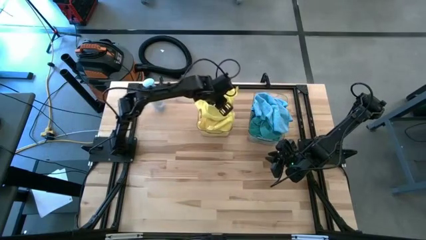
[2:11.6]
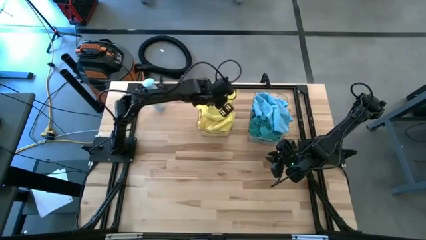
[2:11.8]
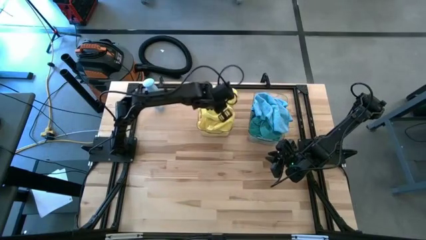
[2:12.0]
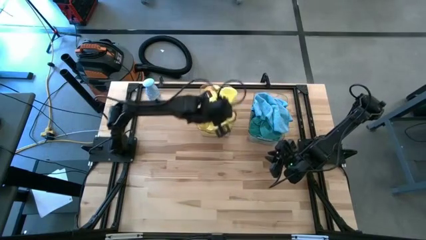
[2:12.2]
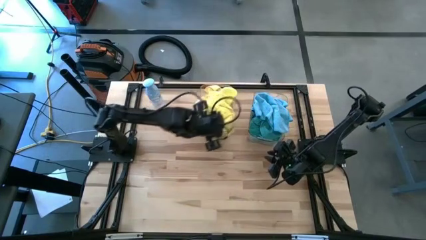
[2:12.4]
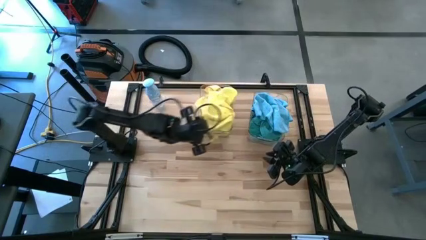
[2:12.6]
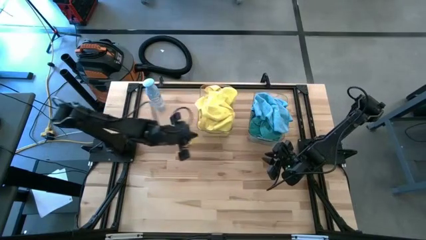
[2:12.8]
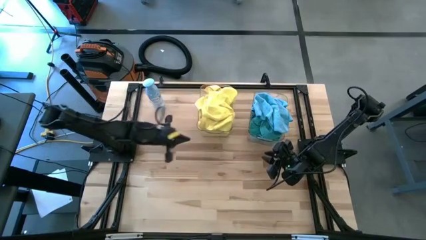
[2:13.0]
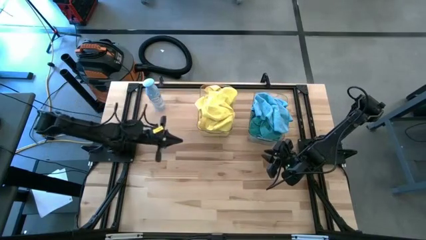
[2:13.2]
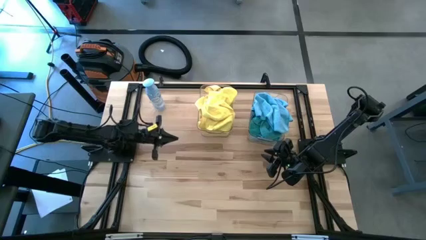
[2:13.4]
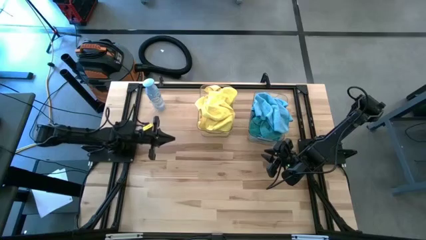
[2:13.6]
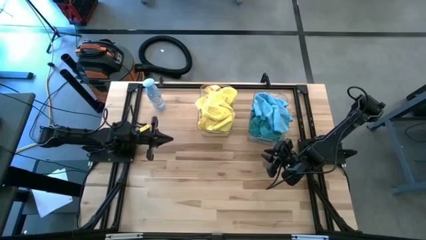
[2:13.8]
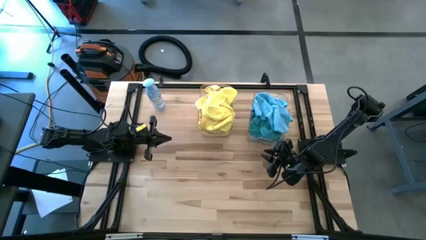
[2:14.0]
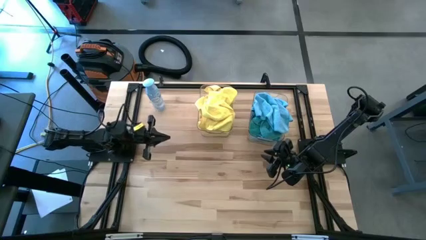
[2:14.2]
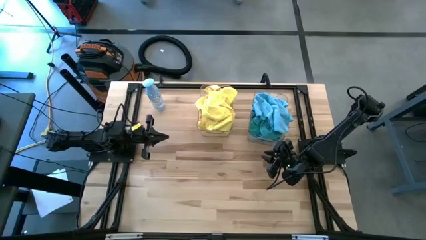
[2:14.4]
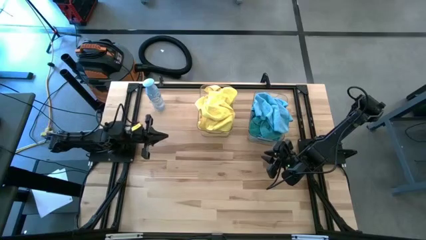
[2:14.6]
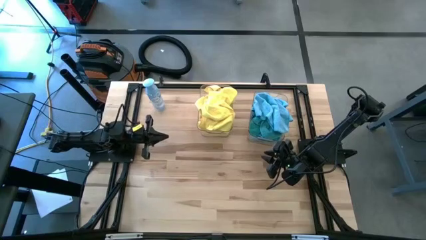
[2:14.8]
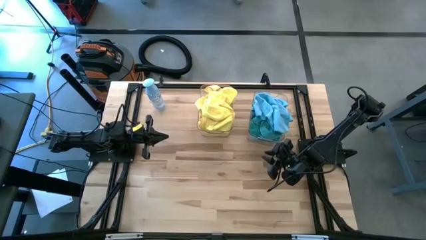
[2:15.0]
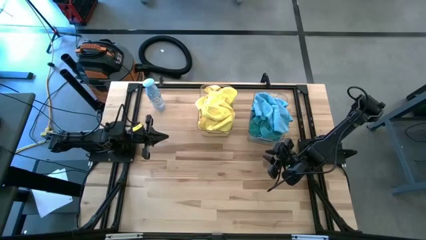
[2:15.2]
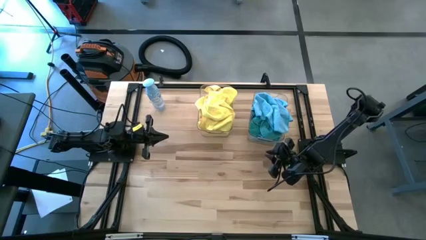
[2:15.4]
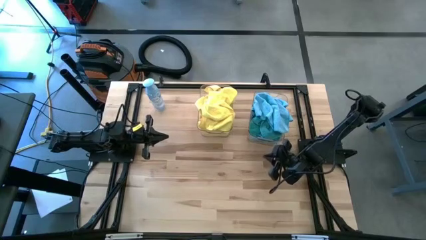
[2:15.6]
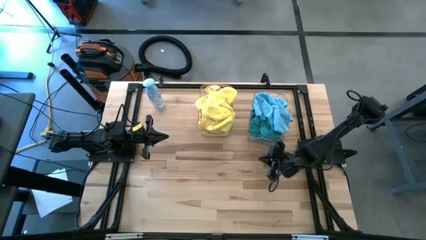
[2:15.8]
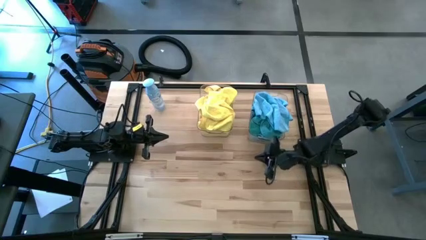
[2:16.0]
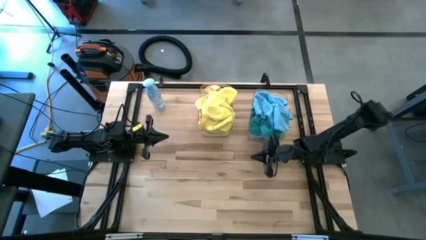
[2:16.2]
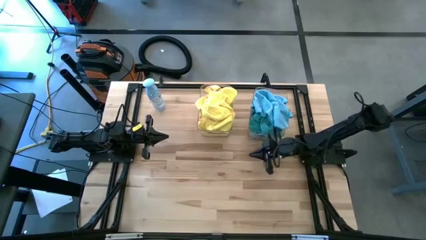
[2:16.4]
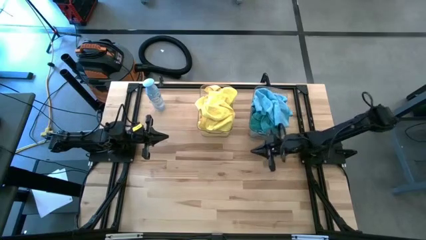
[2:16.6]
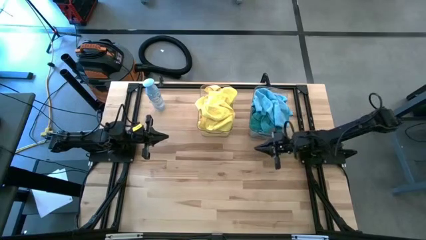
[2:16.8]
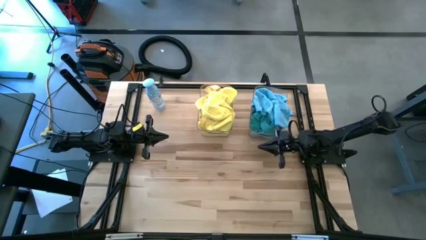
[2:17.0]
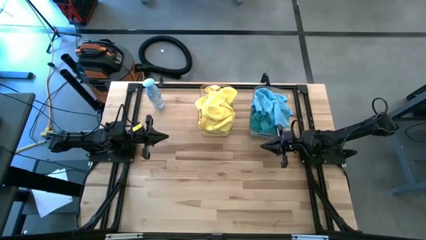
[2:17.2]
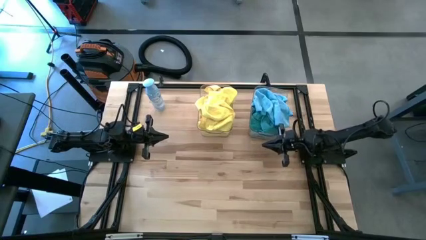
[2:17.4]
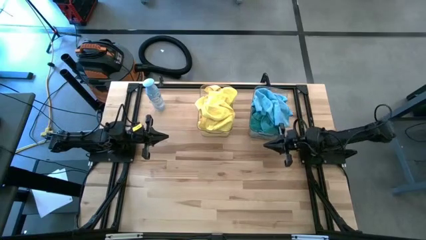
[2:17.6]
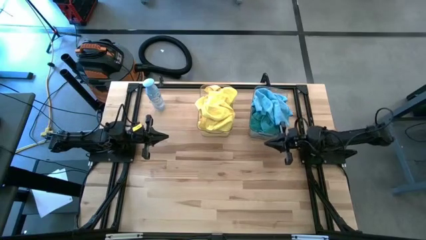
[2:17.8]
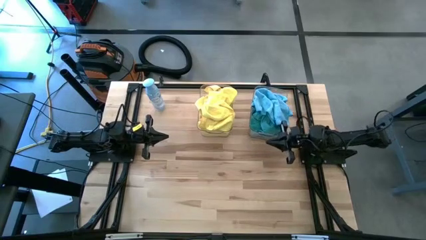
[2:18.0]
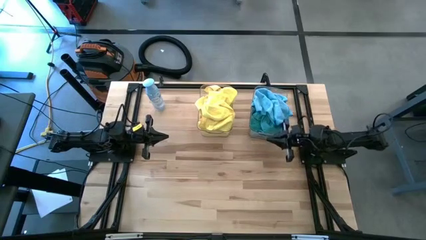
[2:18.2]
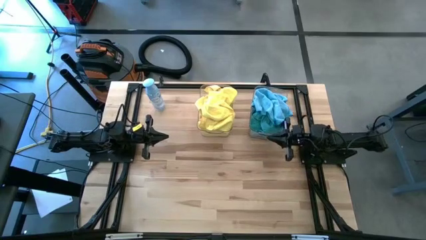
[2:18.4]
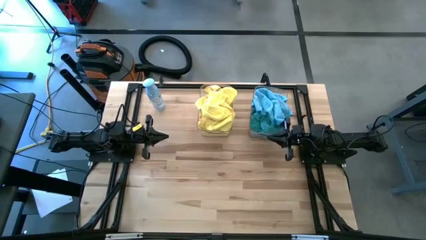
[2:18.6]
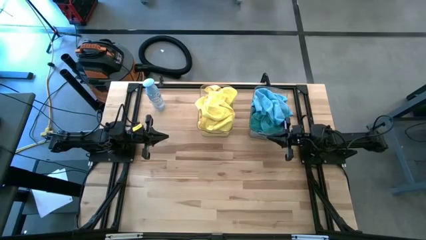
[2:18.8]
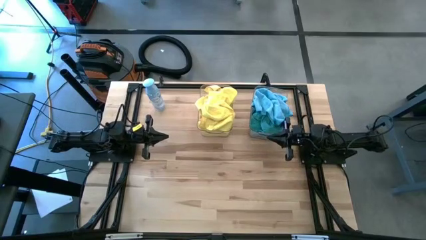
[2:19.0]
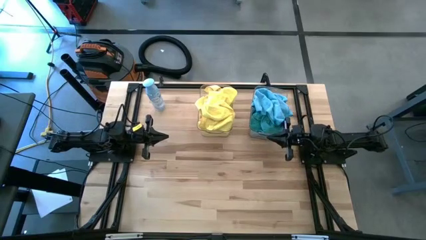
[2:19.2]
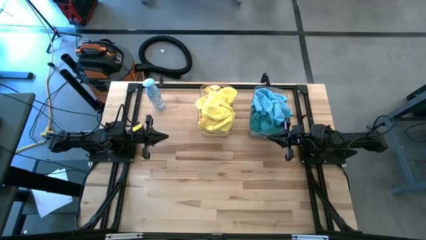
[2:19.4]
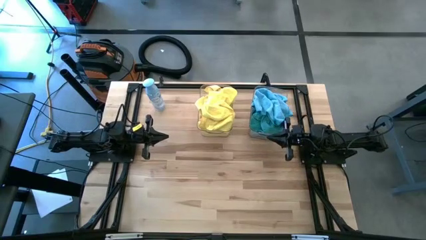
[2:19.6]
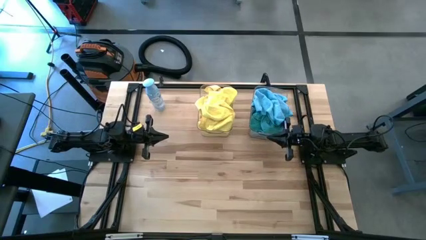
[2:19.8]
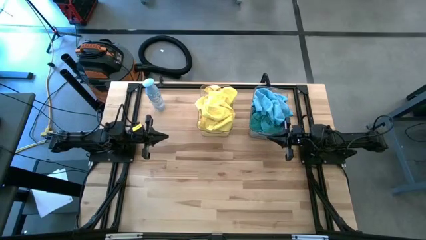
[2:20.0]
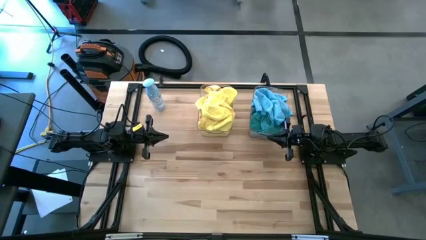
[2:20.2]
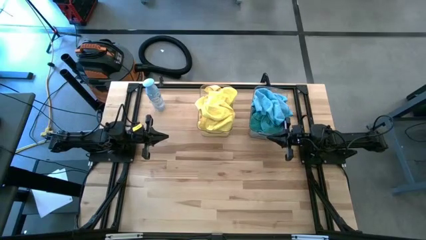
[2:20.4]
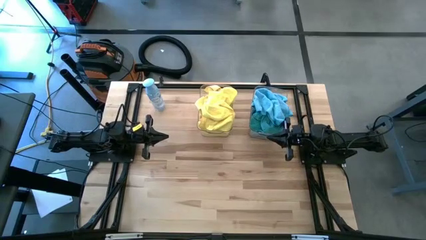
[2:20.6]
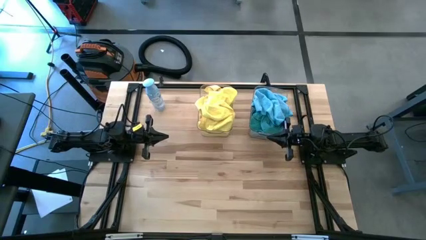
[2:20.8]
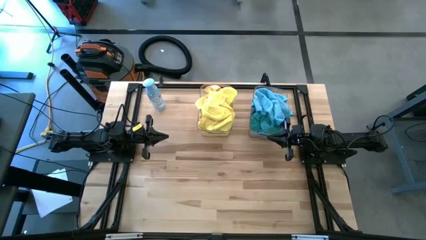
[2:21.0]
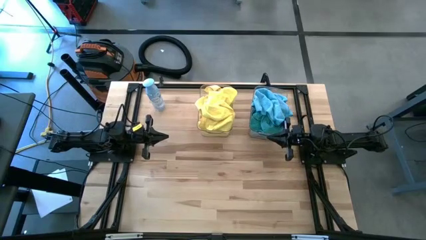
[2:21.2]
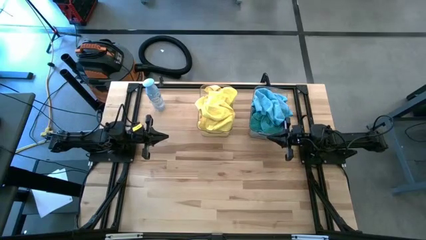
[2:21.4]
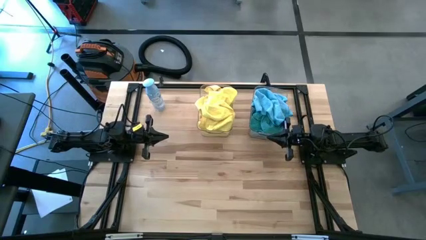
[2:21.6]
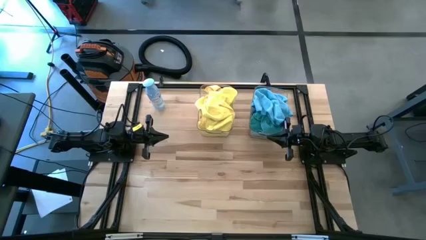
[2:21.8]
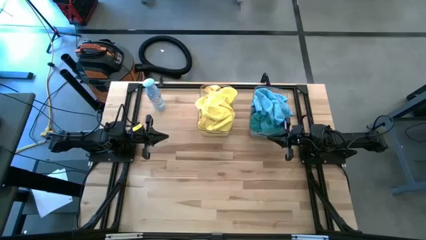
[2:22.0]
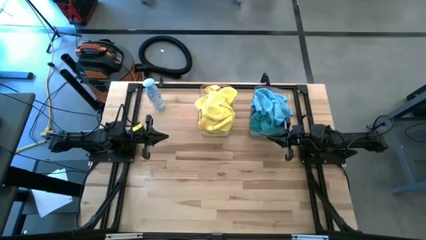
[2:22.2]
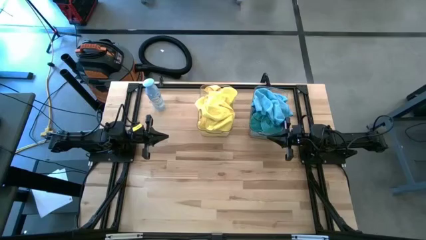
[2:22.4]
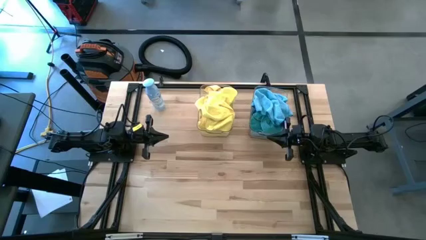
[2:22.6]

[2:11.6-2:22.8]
Task: Sort microfiber towel by color & place in baskets
Return to Home Position

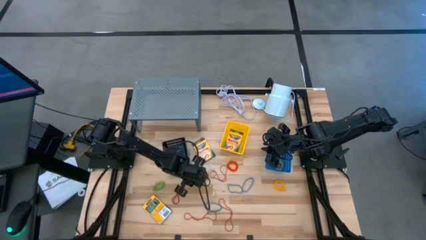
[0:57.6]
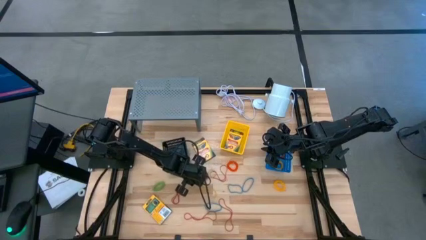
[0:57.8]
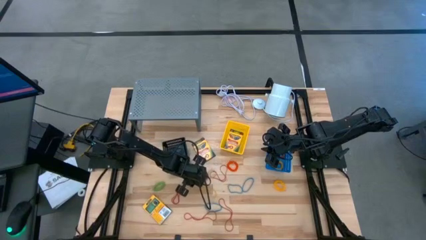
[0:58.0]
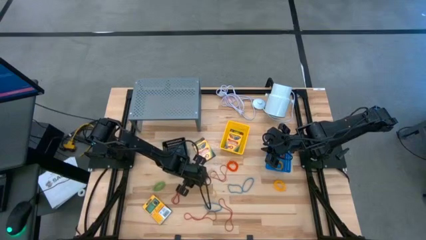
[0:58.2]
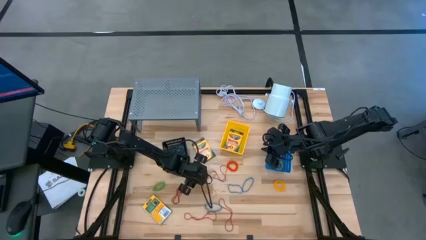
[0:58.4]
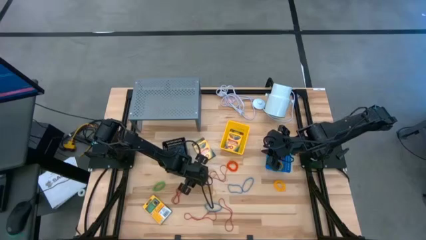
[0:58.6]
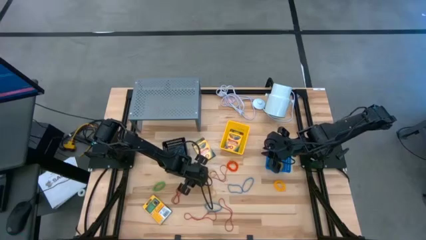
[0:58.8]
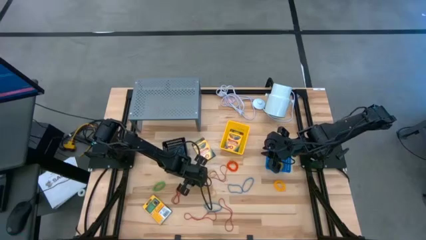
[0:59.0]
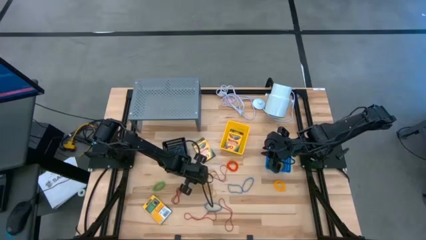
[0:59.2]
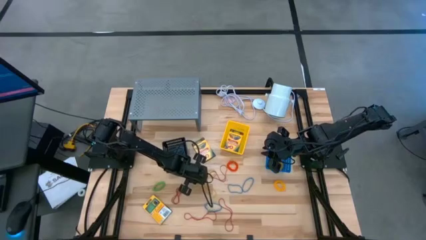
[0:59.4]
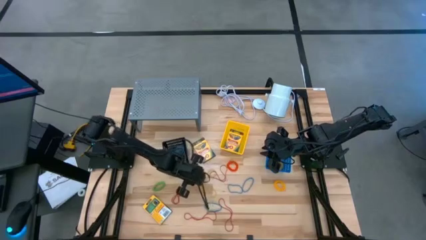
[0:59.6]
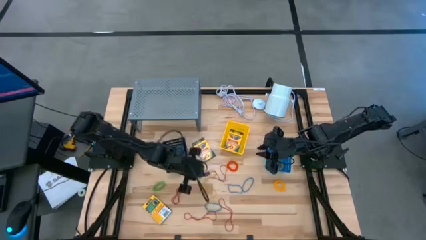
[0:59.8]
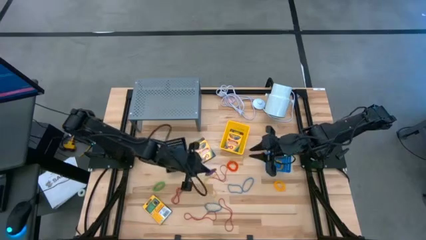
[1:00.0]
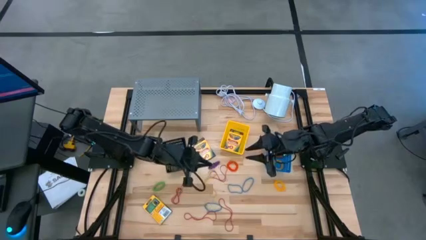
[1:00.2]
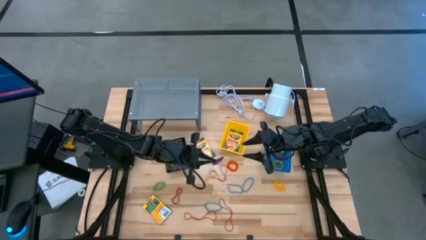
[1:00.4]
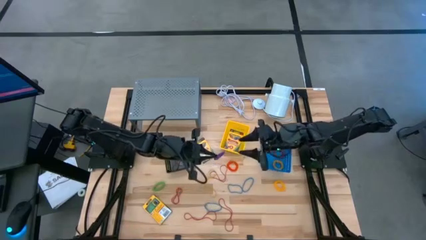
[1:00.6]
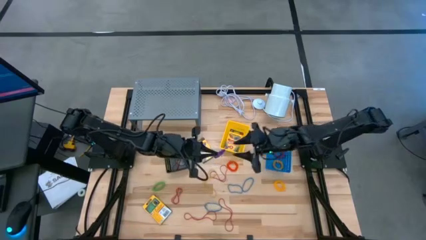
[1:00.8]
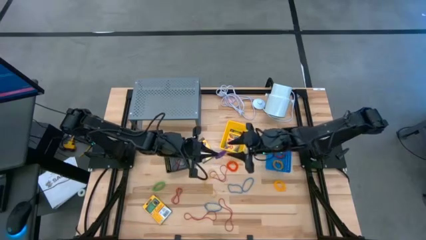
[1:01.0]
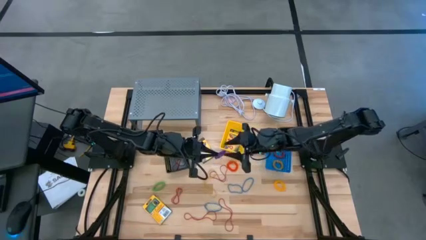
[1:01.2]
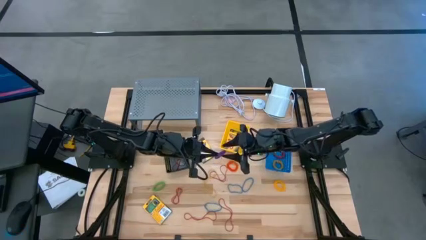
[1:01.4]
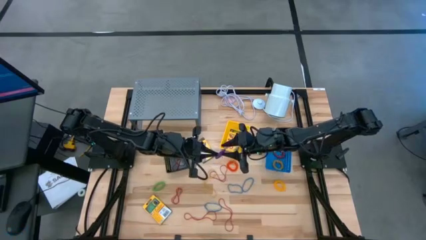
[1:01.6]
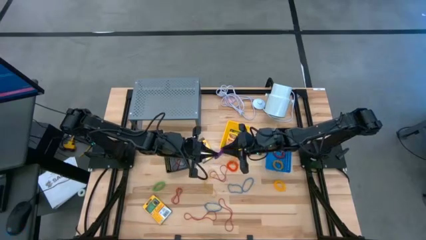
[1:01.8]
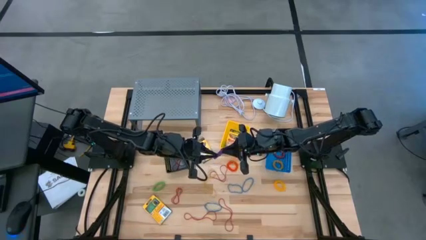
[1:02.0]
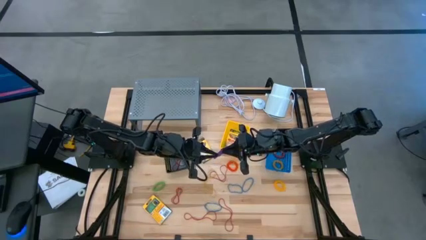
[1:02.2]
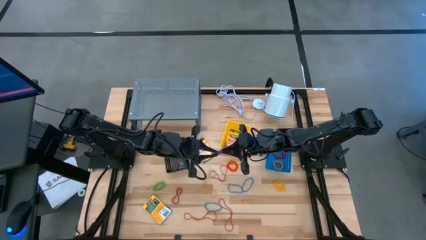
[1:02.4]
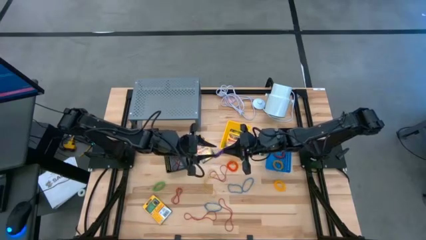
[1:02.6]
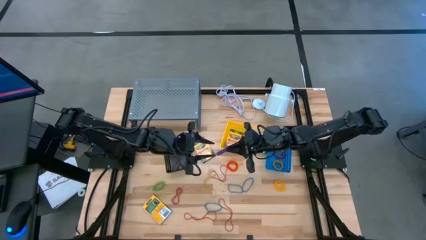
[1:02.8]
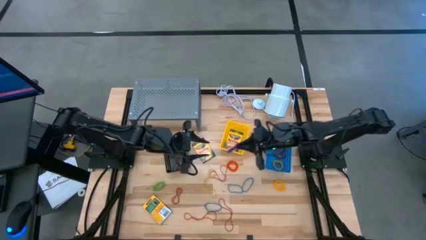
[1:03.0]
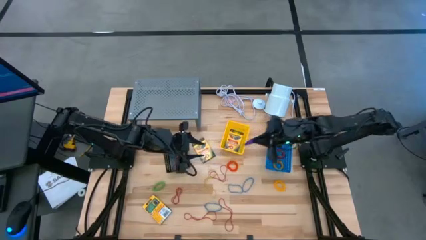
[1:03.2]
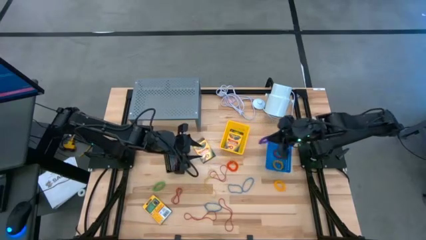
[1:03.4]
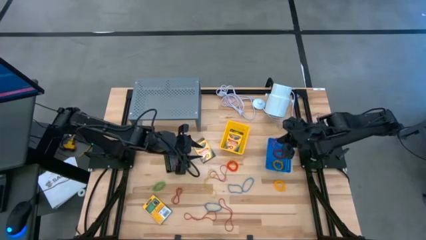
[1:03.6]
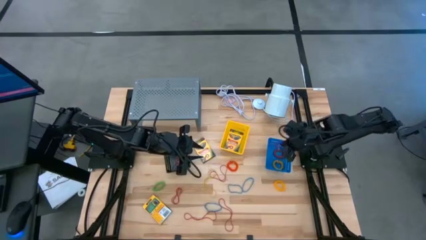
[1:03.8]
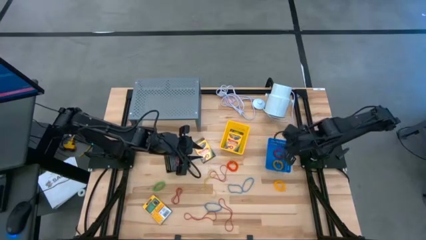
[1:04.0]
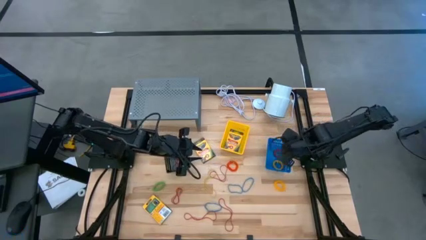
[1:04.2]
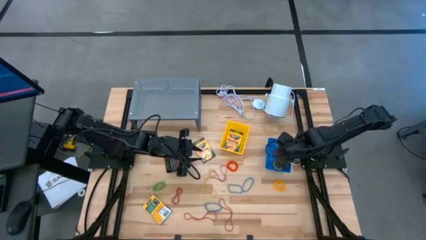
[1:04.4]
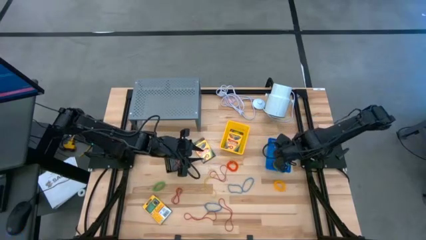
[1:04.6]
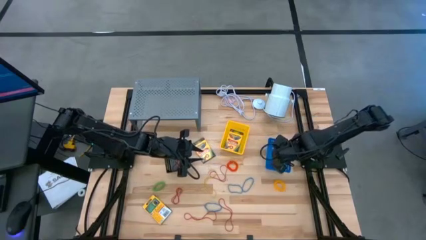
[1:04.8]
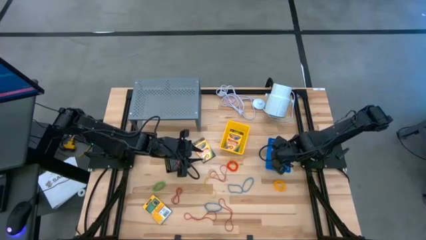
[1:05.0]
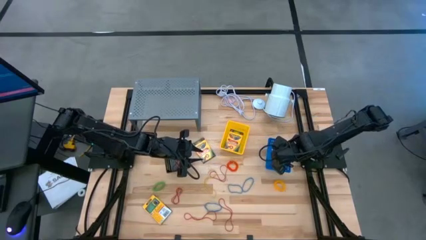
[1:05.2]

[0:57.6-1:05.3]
Task: Pick & Place Office Desk Supplies
Put the violet rubber band into the black bin
